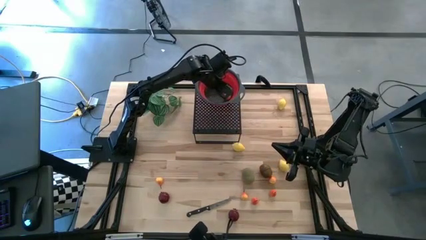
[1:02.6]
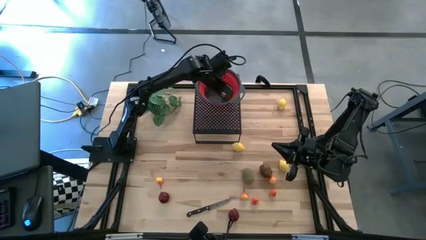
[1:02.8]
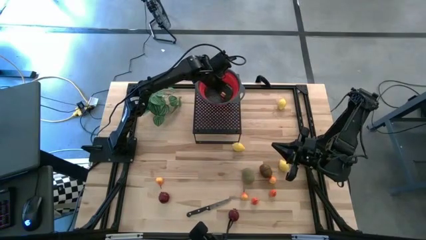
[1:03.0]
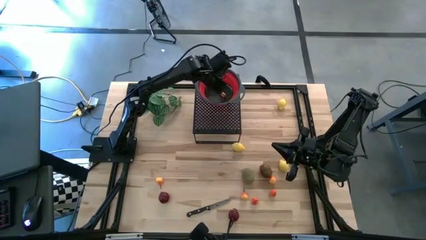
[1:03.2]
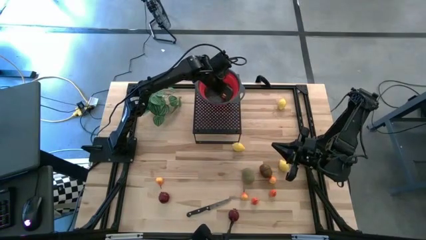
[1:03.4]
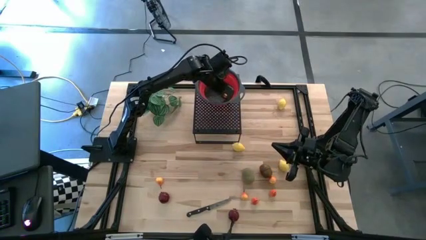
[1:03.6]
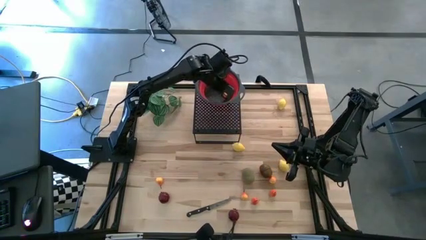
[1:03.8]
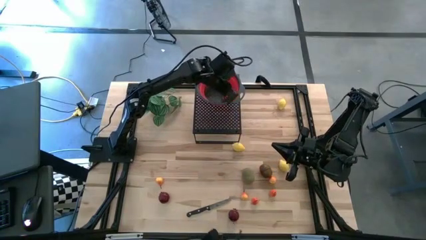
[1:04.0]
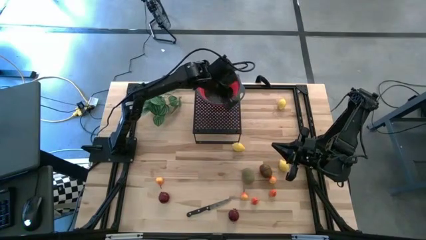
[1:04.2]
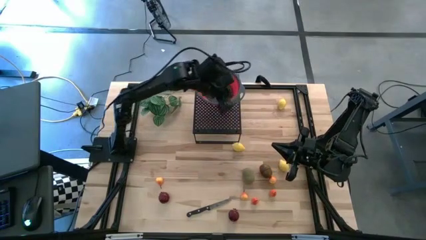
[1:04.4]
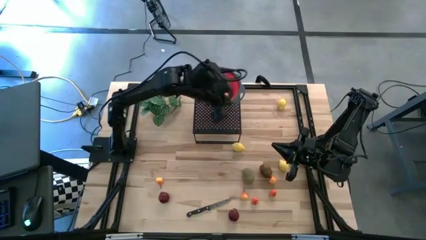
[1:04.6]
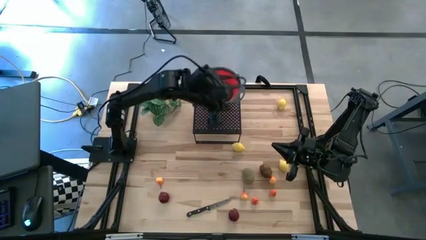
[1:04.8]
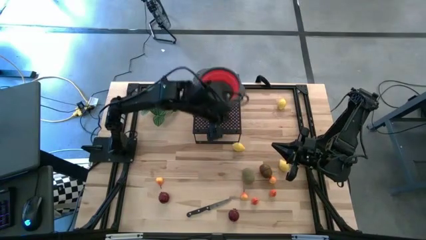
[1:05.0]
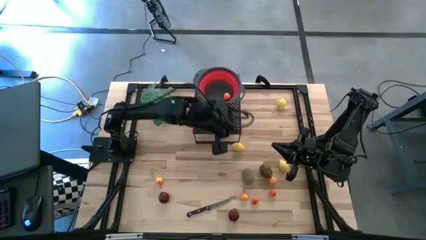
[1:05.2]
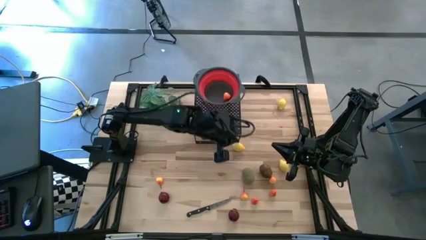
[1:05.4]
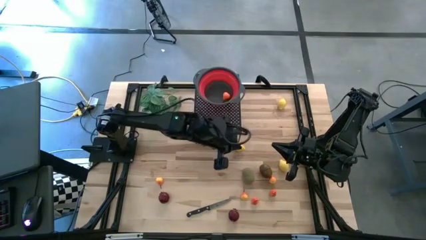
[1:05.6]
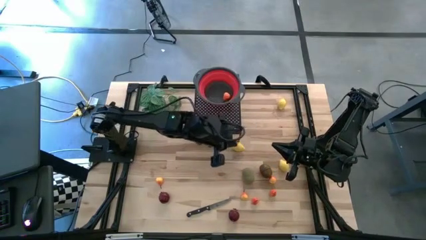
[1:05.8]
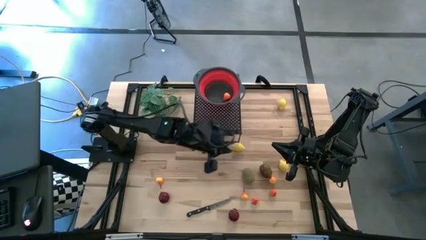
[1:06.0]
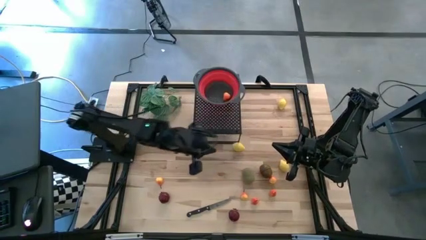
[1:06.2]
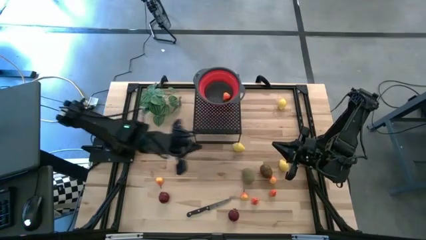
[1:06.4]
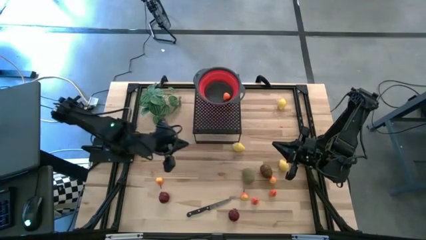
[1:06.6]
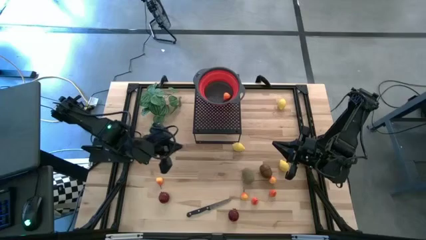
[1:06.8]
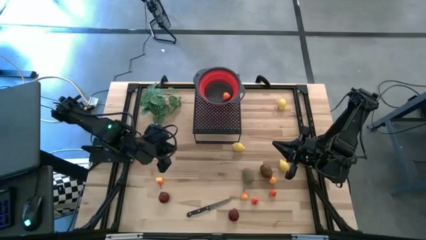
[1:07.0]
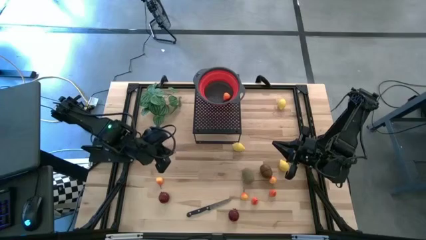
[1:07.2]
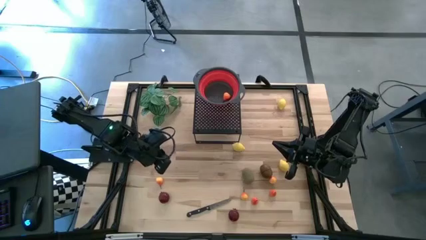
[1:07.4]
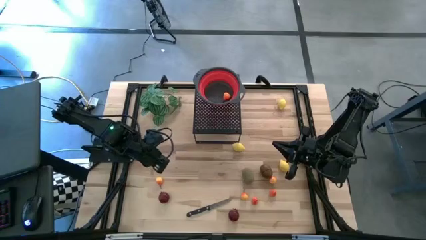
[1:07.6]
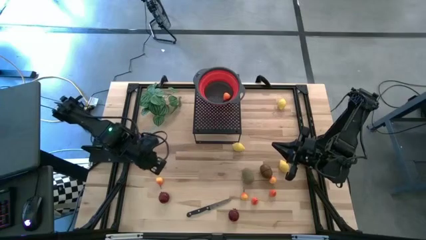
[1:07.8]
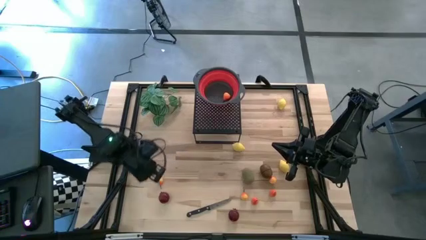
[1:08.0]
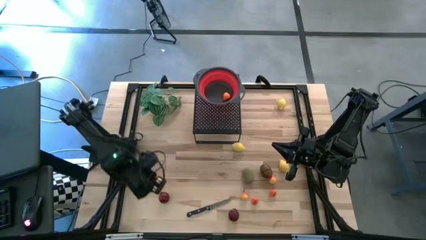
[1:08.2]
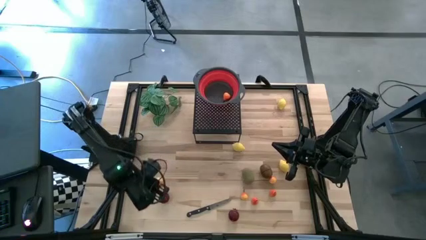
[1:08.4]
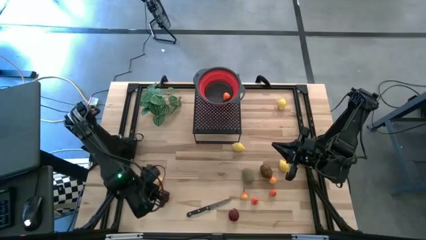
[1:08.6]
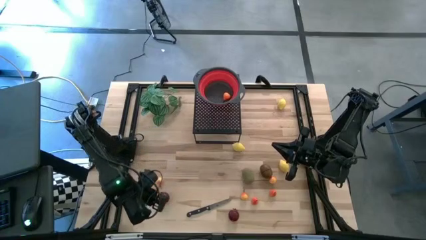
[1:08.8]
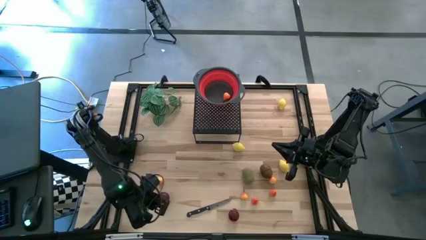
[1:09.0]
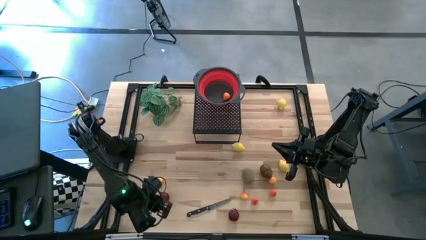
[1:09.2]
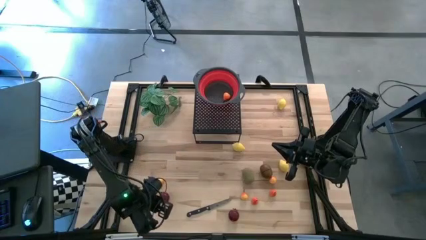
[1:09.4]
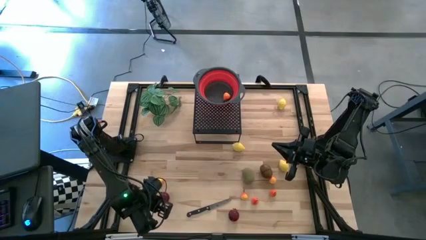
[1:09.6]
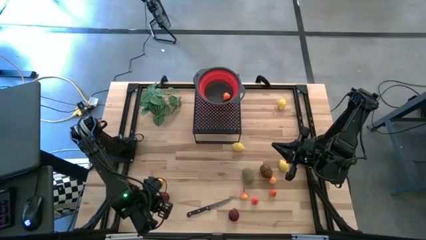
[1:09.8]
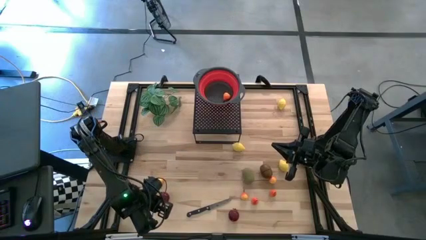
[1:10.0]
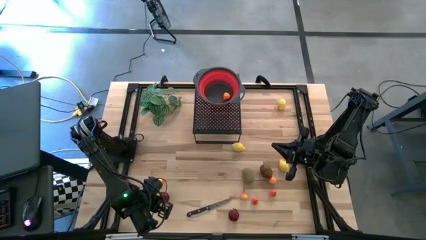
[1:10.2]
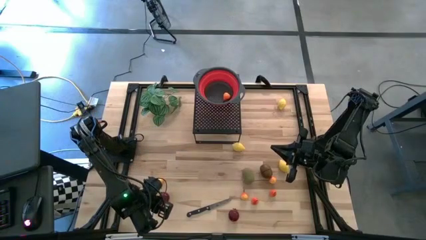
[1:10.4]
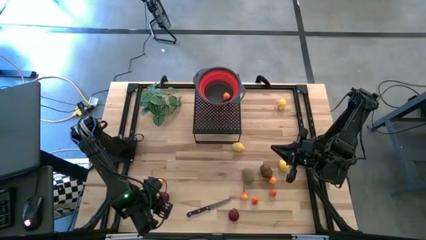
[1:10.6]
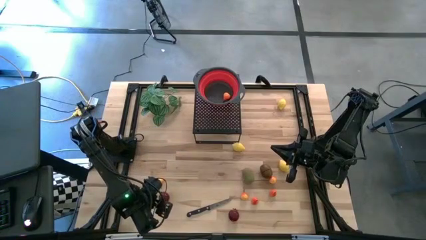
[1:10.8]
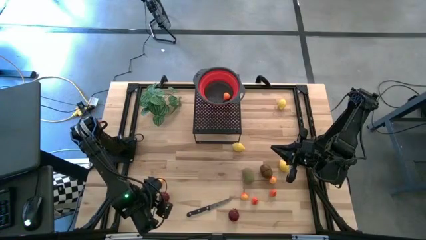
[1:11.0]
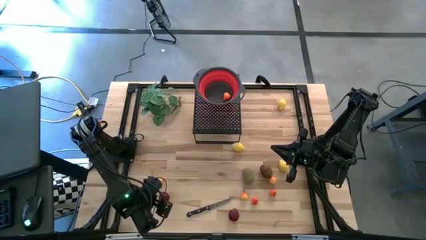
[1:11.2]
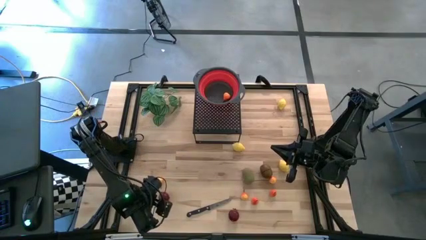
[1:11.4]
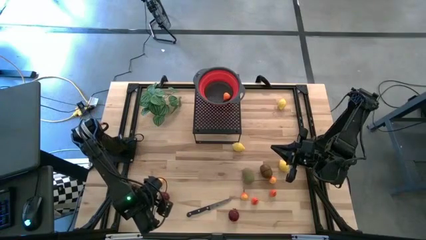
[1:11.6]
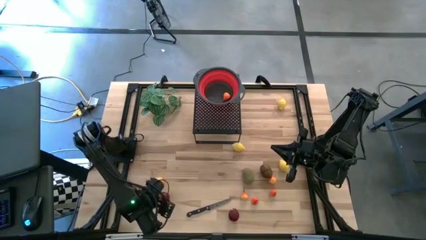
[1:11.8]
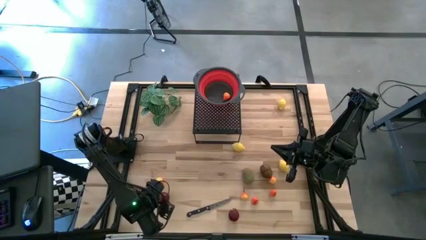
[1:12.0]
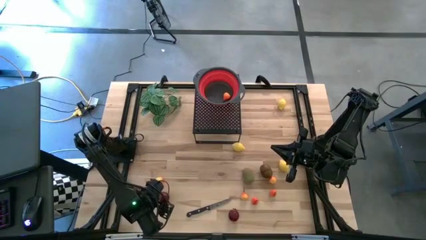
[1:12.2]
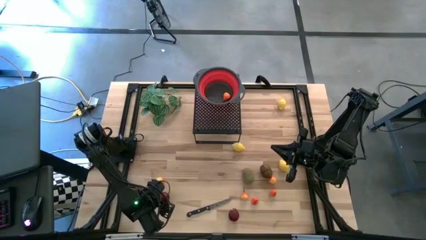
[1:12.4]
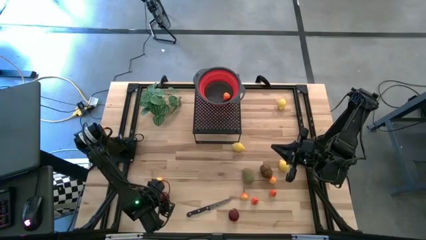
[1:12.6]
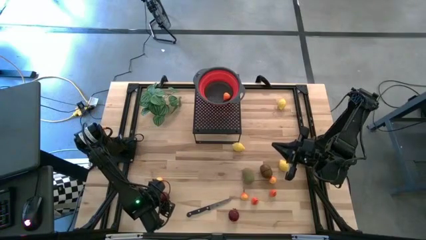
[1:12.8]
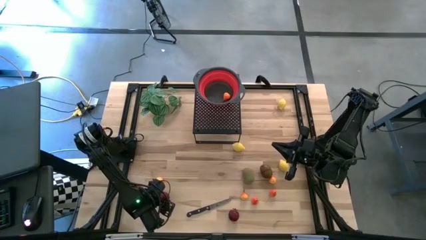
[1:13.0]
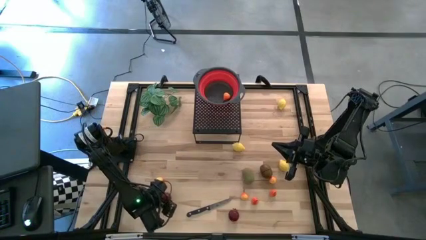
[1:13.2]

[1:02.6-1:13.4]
Task: Pick & Place Fruit
Put the left pomegranate into the red strainer bowl
